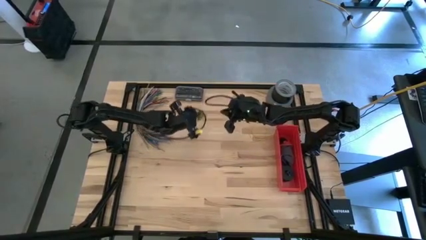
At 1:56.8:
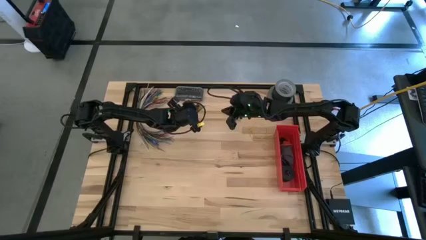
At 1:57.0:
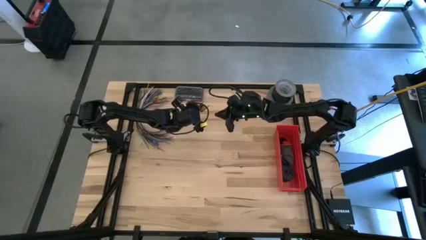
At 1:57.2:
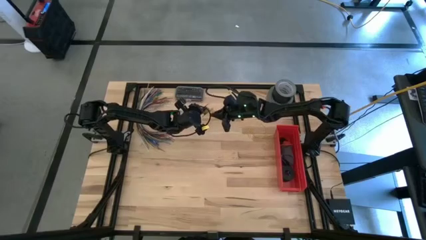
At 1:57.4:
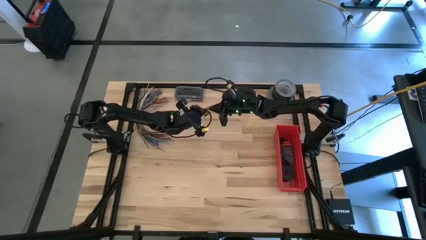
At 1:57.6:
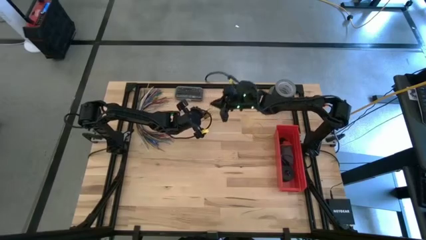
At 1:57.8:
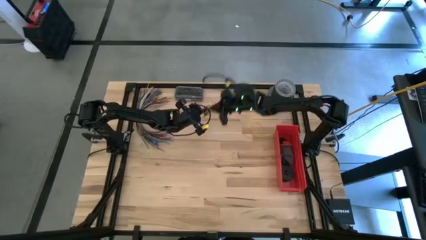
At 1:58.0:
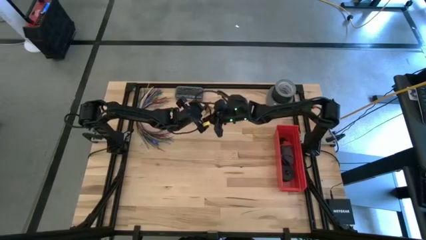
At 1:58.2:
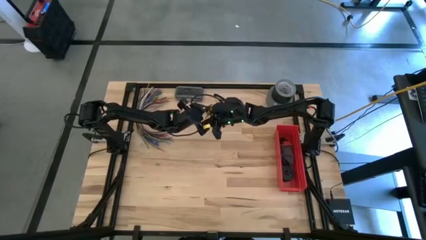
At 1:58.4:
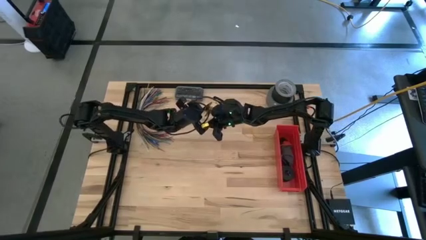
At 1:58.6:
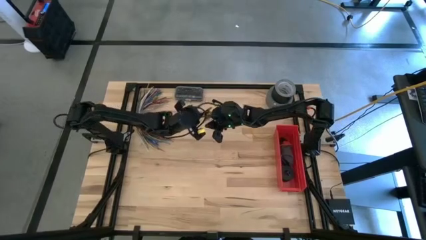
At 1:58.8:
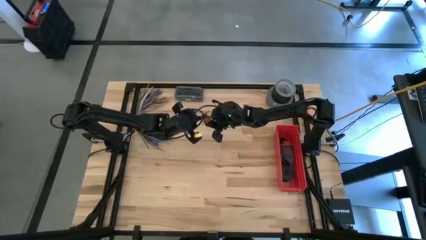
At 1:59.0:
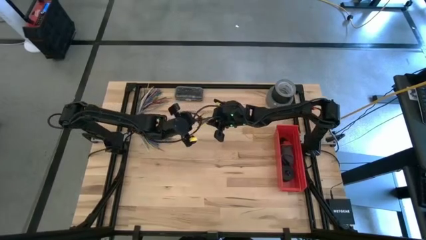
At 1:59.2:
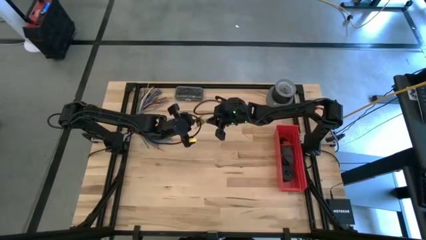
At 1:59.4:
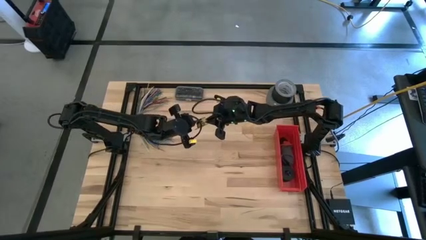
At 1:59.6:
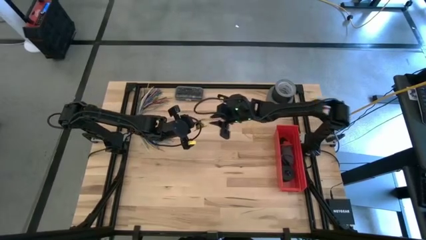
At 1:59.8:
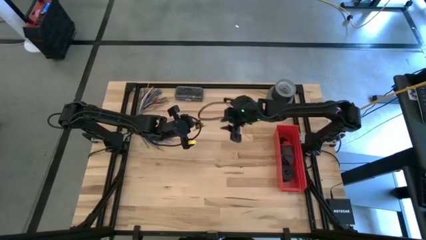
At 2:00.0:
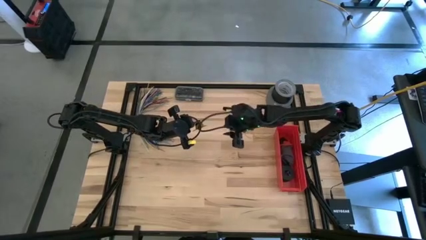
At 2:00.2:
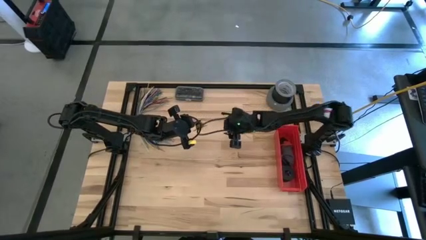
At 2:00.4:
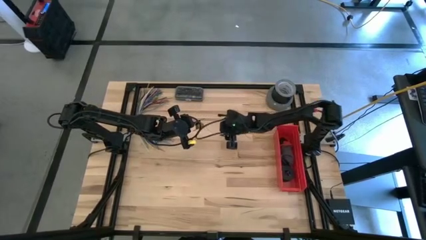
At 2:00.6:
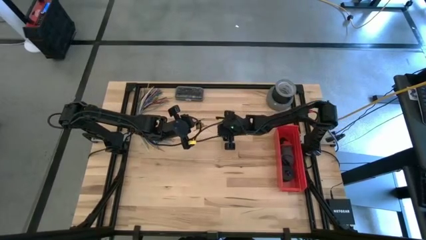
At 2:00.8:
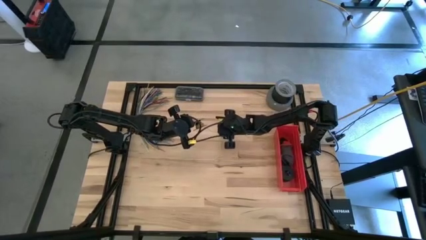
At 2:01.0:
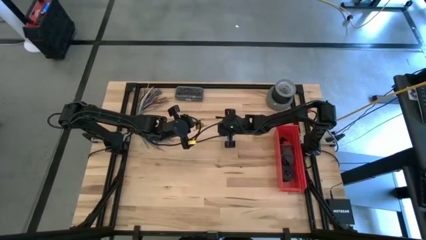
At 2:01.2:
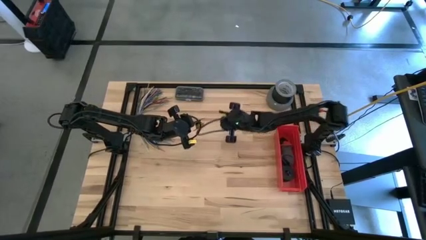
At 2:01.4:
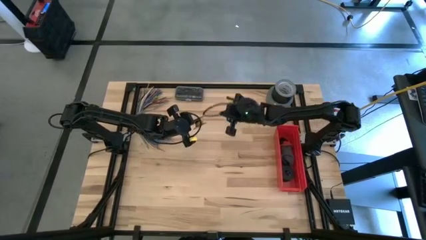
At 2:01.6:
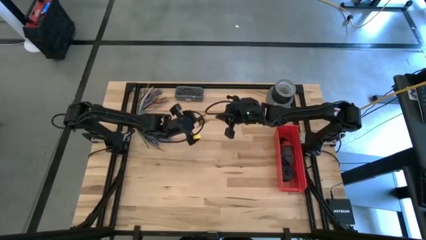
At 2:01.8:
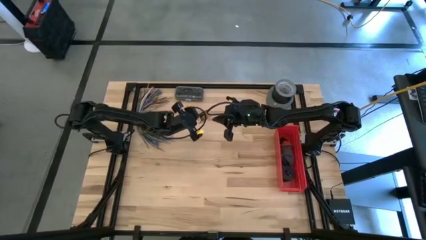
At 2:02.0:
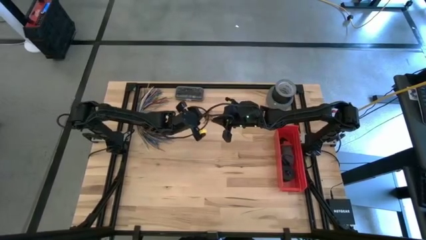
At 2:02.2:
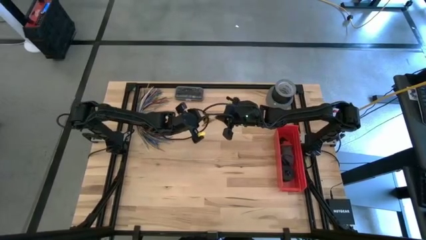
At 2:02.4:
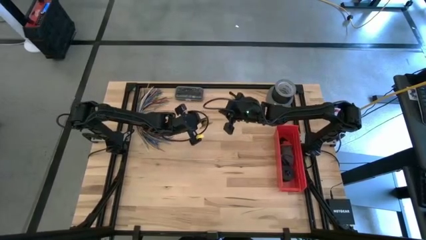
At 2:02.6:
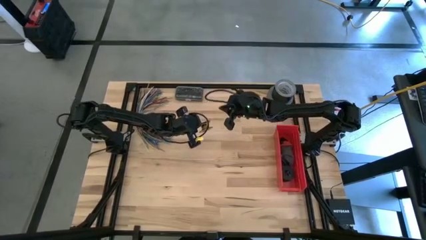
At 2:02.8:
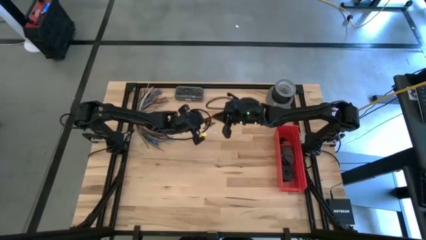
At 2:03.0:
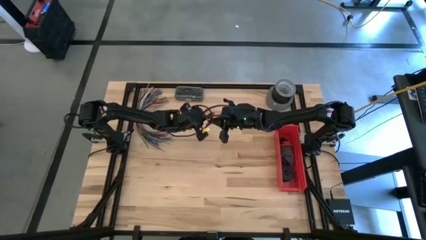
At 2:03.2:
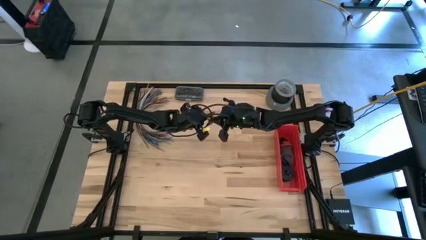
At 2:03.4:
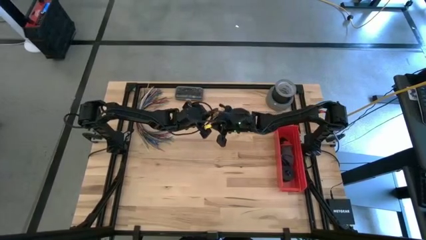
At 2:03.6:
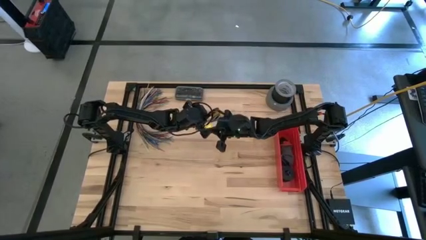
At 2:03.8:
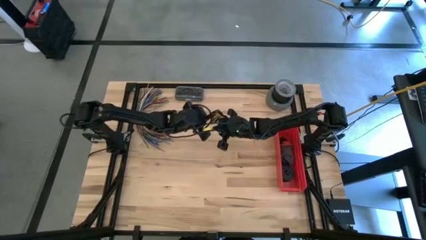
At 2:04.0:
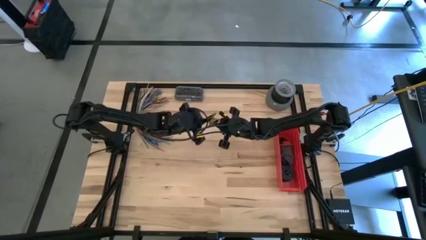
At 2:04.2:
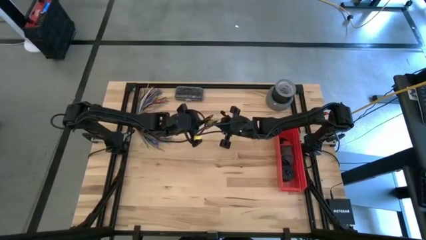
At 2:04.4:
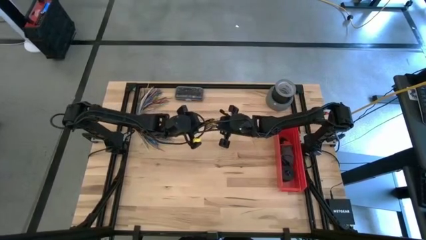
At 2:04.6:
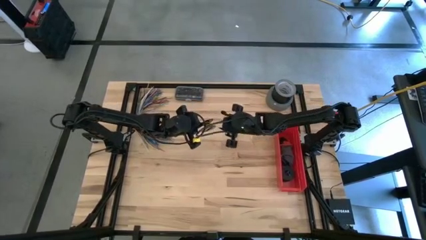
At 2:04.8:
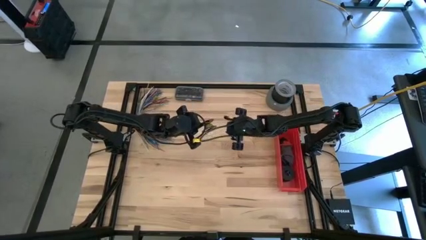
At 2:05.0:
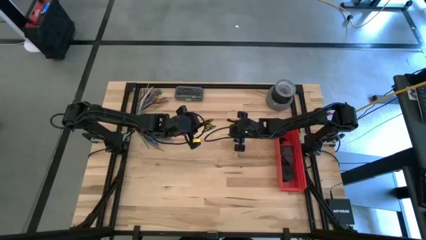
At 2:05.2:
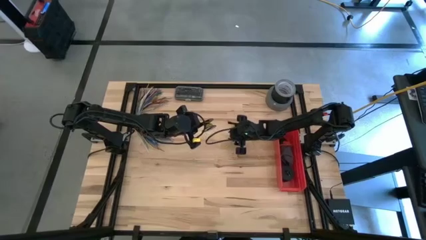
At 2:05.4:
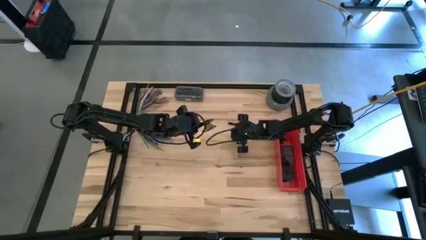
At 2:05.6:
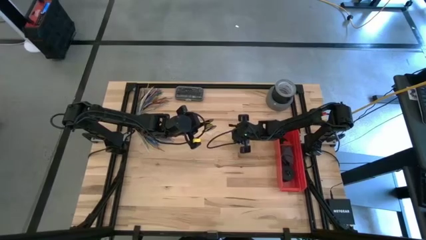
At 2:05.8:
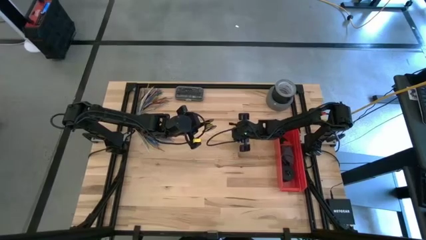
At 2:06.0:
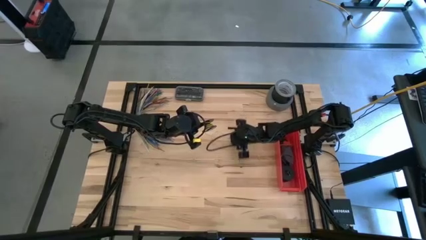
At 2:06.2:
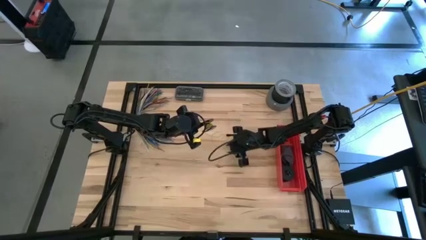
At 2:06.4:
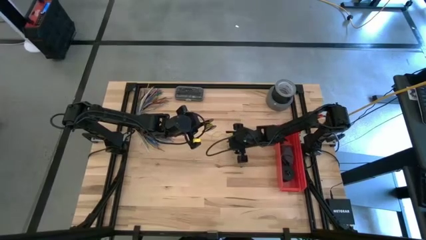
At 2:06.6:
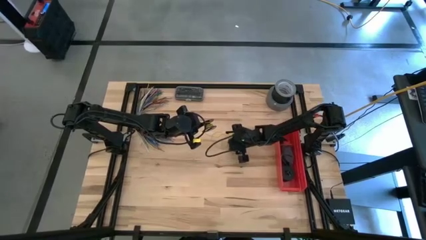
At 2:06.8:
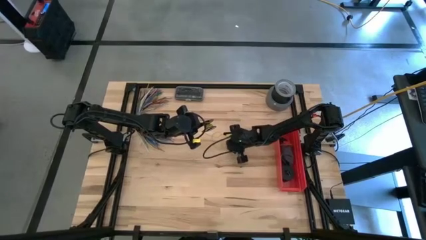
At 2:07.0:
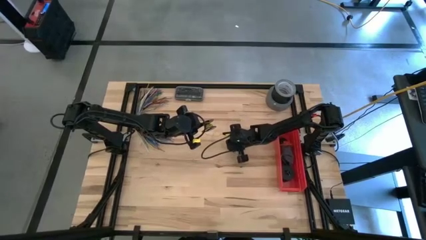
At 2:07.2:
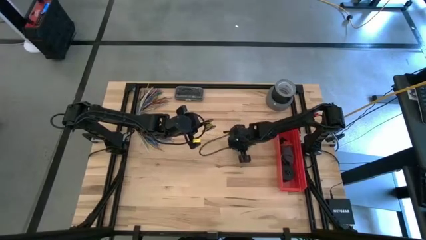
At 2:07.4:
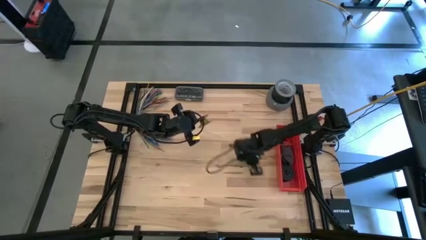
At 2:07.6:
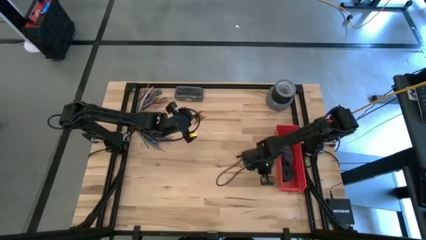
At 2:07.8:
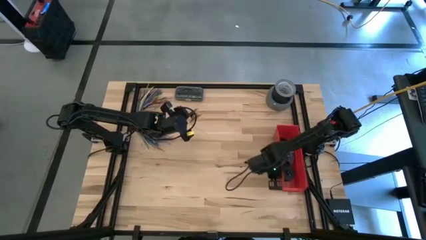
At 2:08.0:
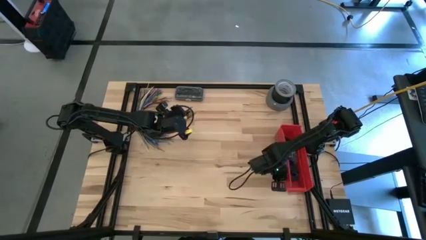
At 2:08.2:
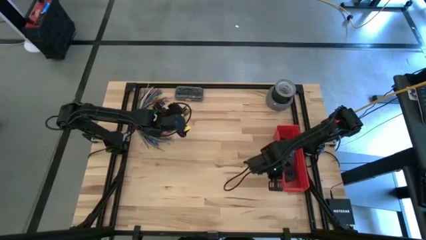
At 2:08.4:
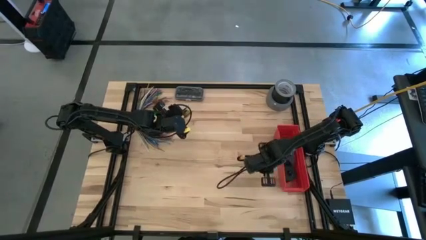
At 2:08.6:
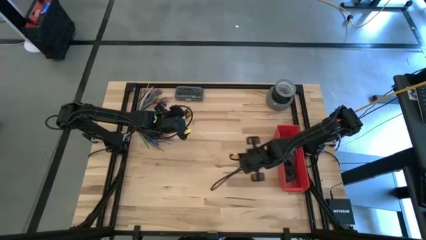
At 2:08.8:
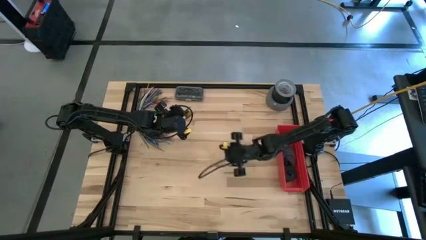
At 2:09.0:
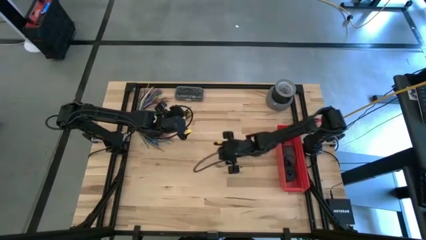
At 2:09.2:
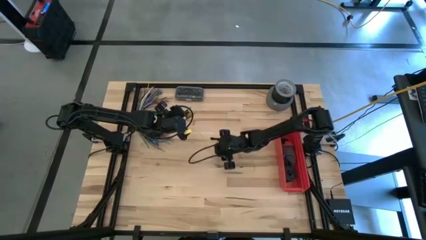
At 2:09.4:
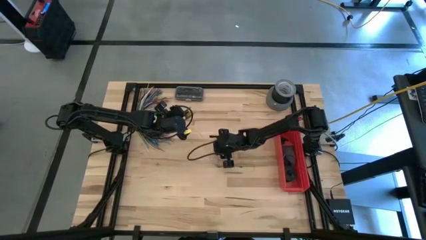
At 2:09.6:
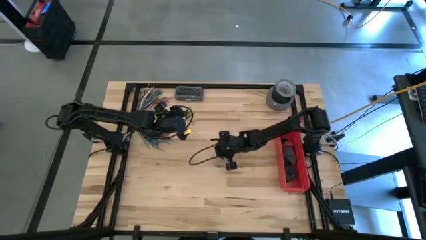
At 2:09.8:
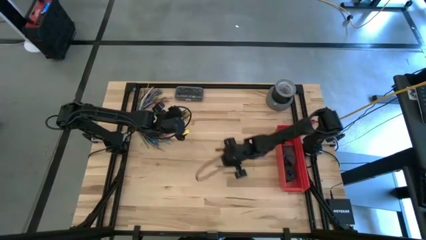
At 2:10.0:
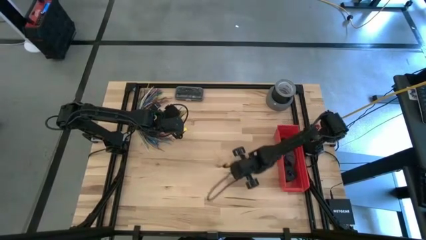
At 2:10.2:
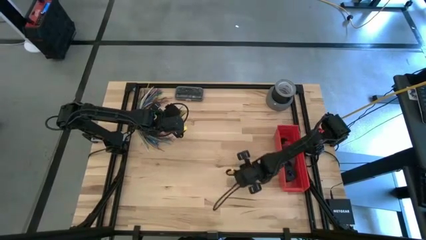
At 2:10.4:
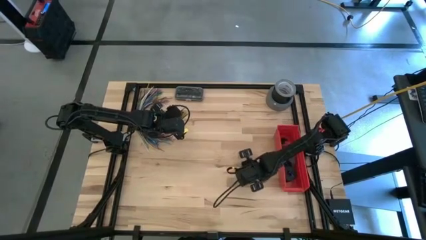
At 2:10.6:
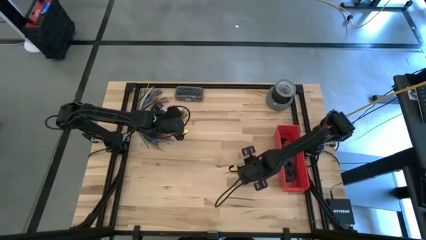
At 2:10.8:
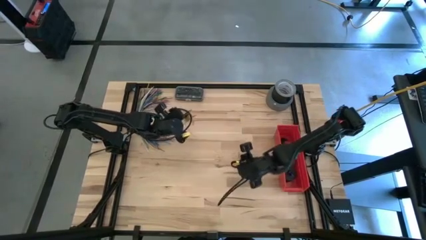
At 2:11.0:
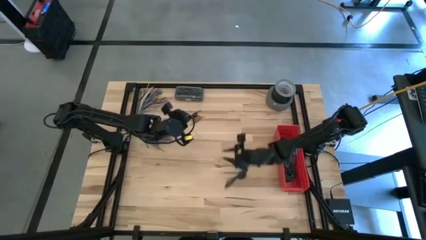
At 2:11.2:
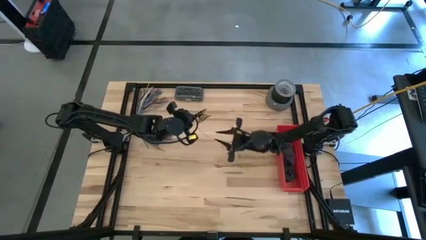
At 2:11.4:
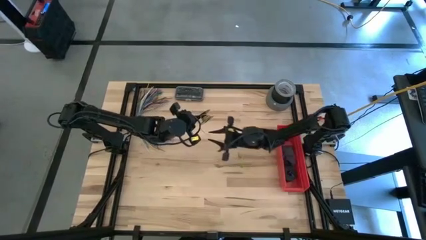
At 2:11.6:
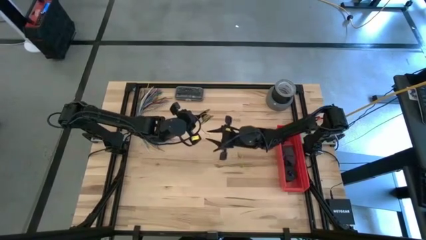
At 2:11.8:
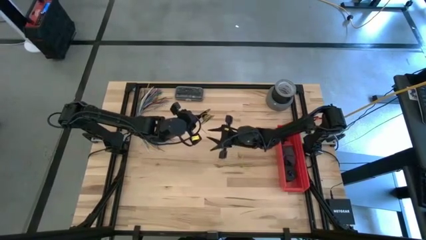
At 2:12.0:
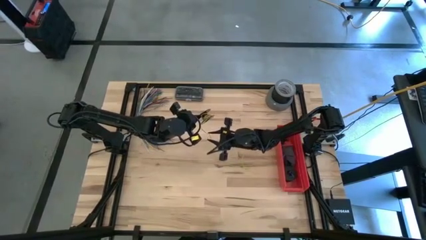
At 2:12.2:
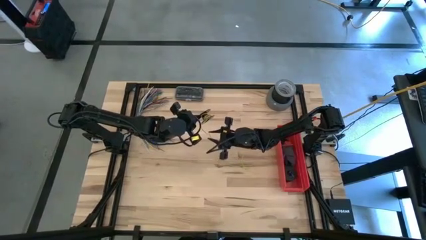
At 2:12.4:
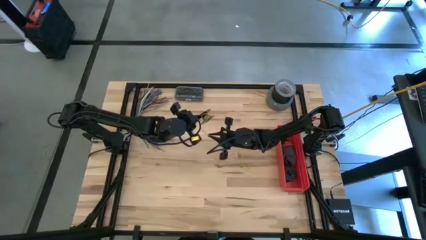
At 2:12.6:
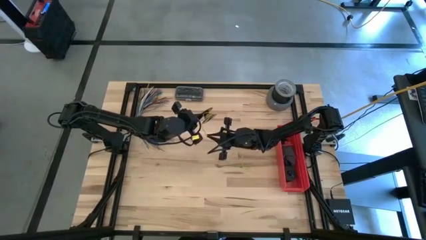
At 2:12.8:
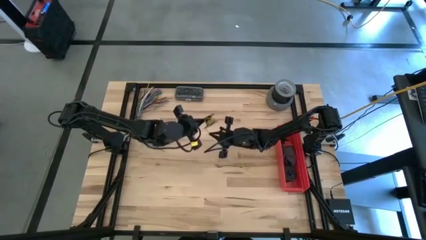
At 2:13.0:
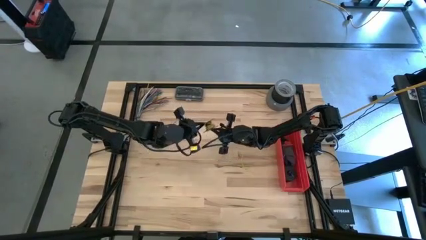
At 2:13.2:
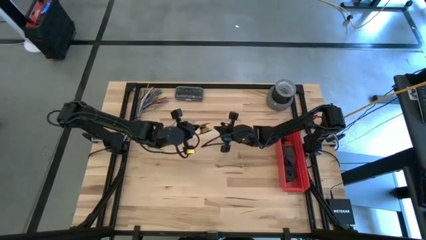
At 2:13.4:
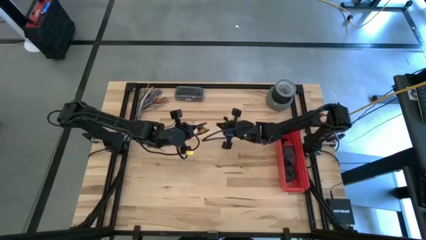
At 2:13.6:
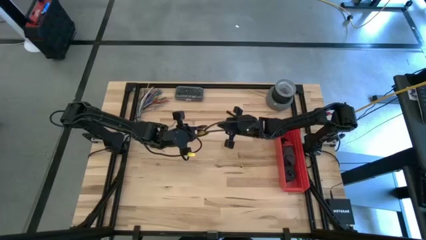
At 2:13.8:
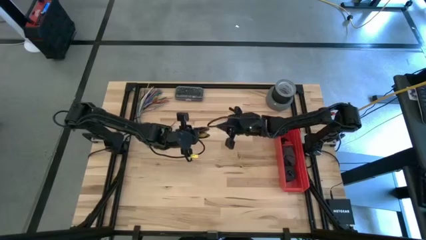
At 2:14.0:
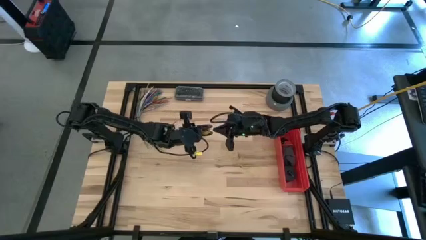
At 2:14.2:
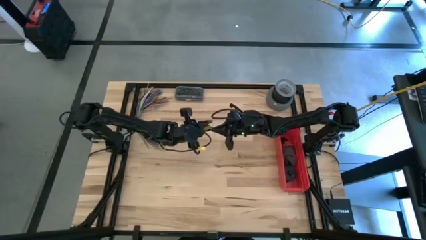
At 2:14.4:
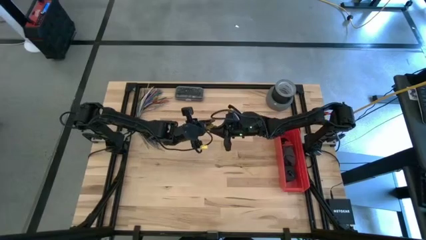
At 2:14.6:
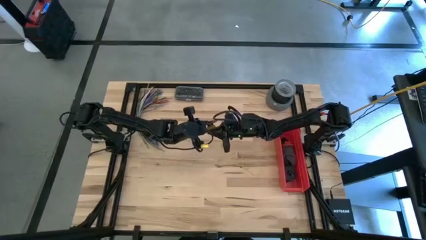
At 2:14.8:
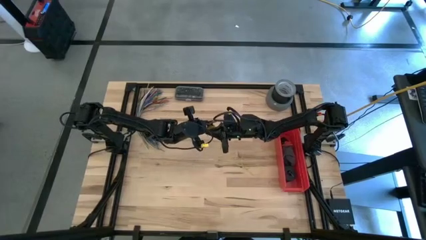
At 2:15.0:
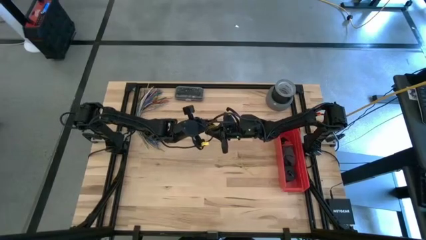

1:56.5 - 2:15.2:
Task: Coil cords
Coil the yellow wire onto the black spool
